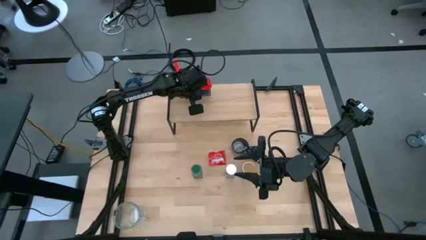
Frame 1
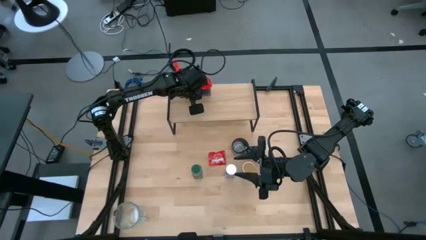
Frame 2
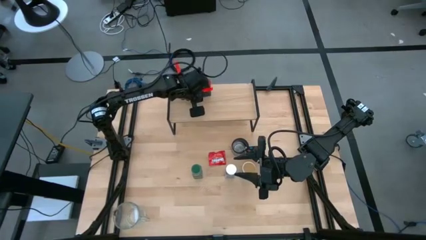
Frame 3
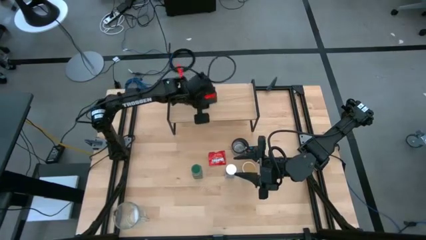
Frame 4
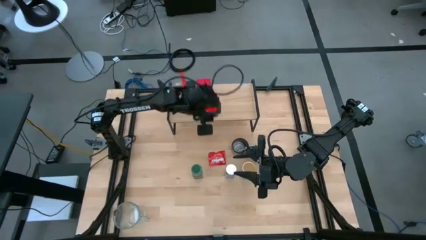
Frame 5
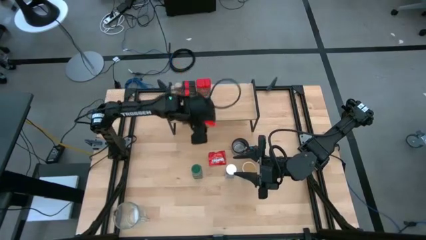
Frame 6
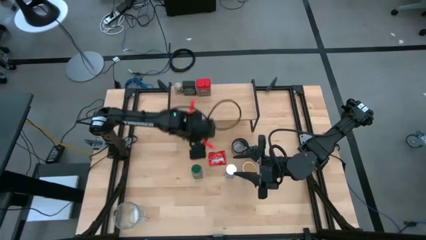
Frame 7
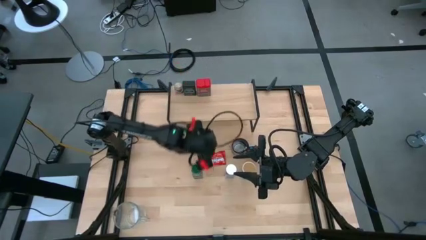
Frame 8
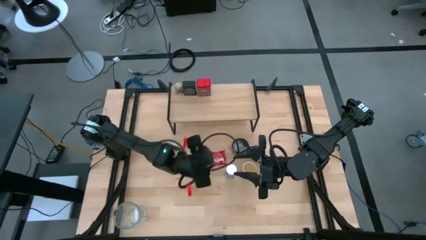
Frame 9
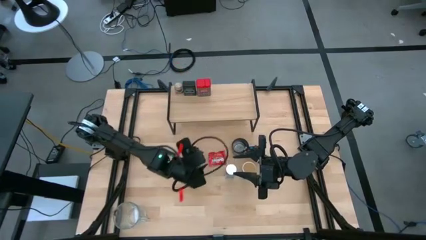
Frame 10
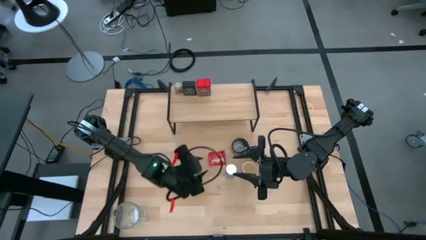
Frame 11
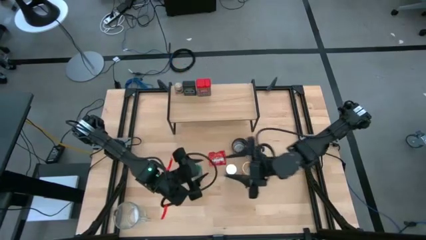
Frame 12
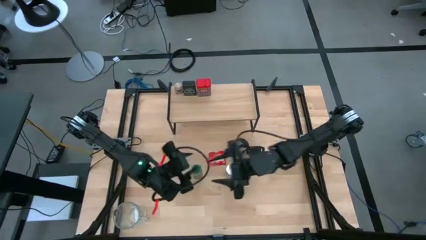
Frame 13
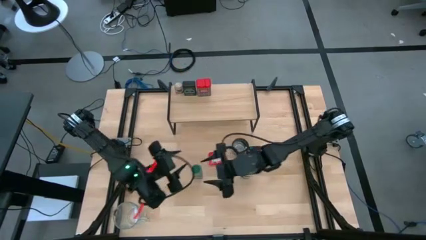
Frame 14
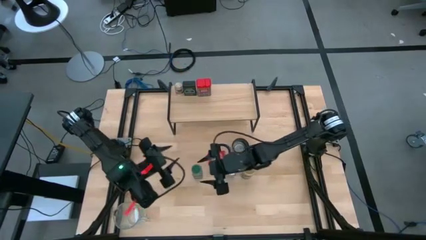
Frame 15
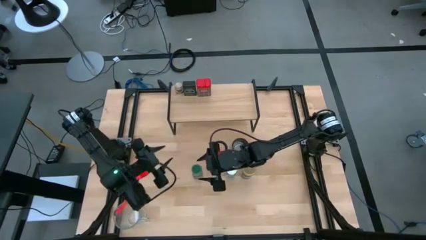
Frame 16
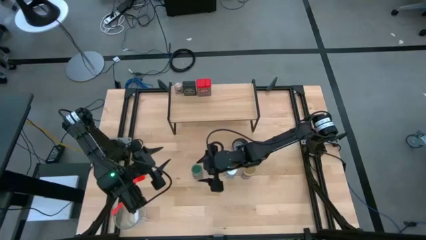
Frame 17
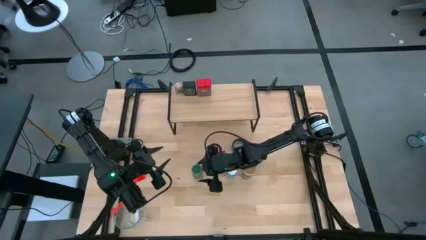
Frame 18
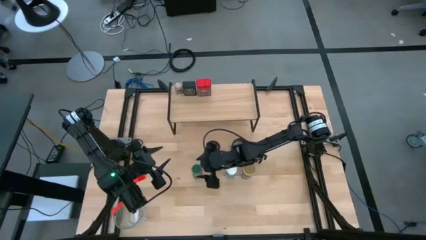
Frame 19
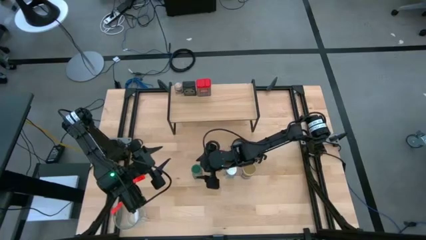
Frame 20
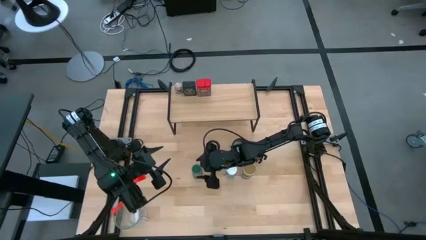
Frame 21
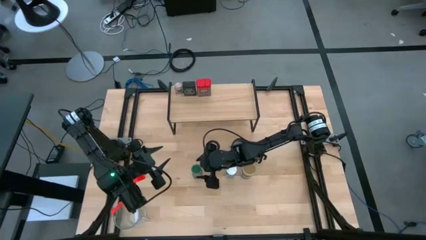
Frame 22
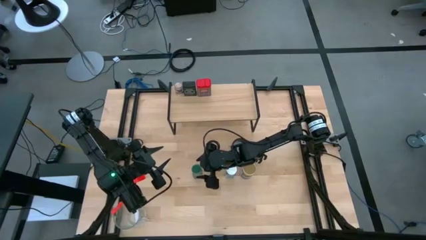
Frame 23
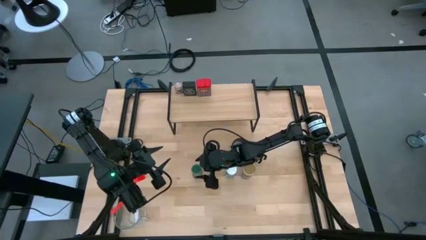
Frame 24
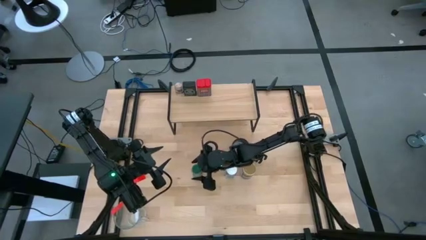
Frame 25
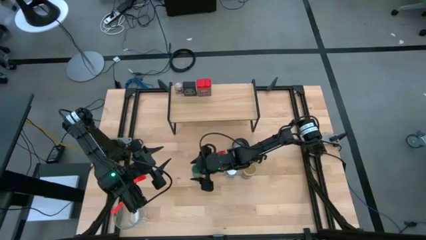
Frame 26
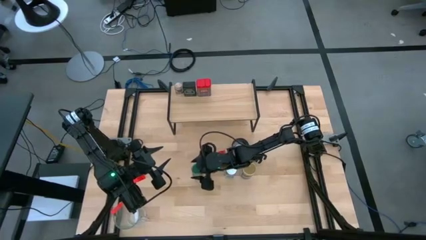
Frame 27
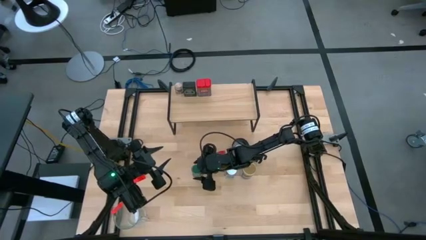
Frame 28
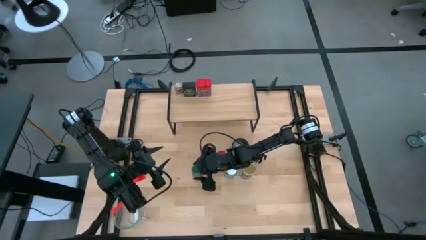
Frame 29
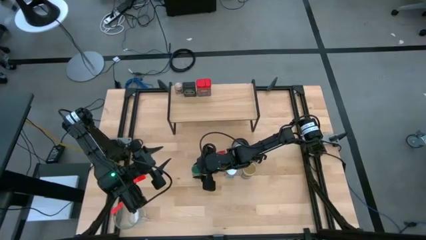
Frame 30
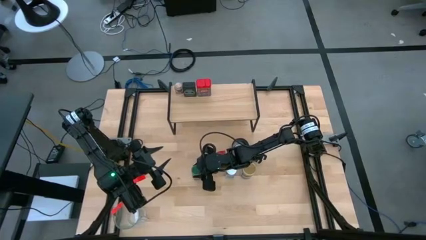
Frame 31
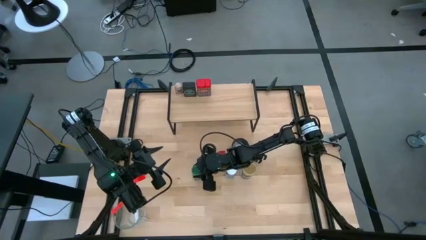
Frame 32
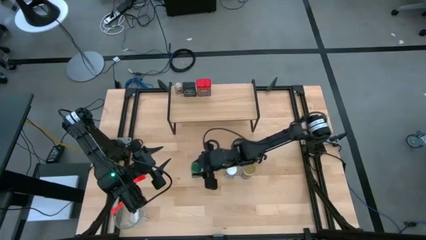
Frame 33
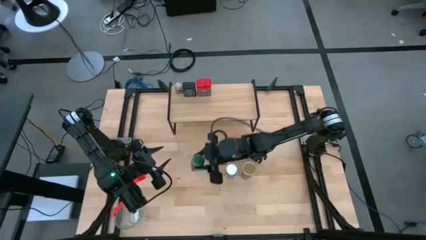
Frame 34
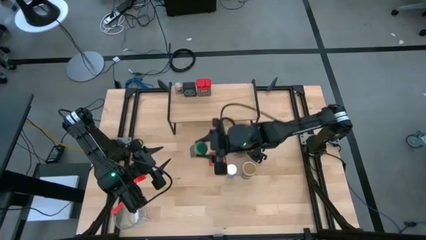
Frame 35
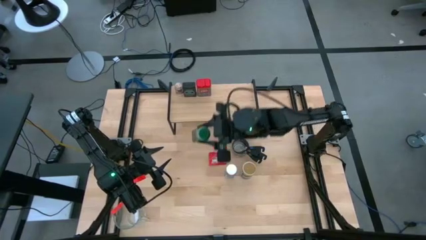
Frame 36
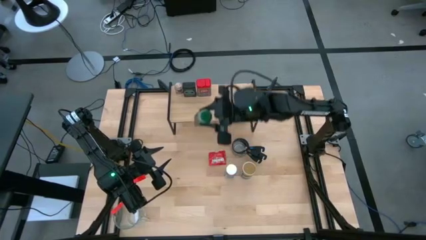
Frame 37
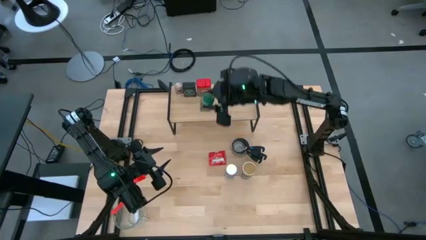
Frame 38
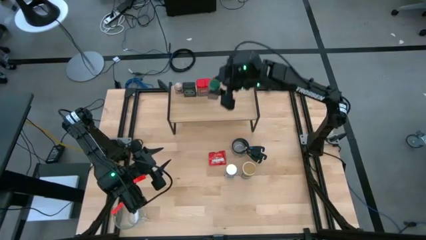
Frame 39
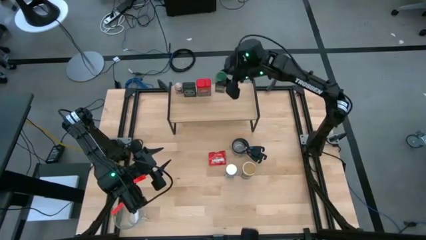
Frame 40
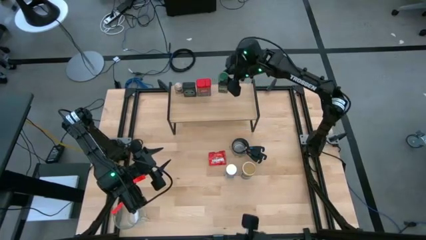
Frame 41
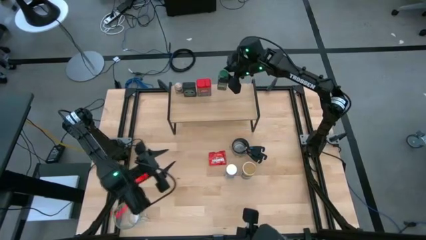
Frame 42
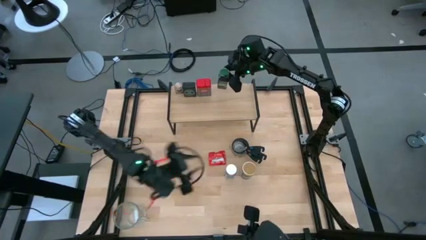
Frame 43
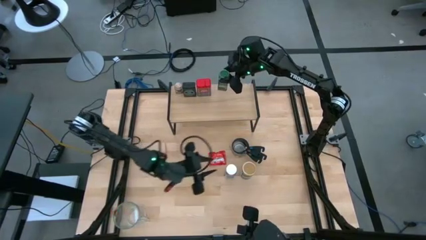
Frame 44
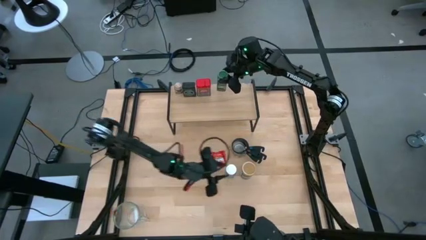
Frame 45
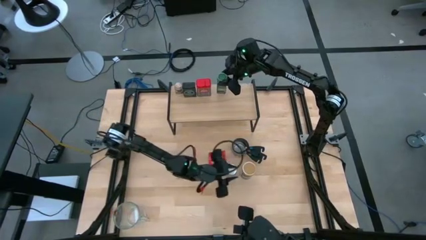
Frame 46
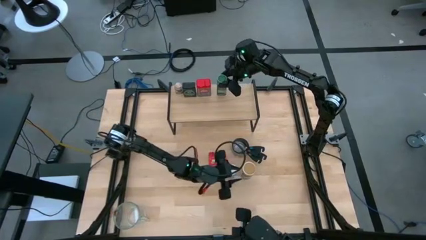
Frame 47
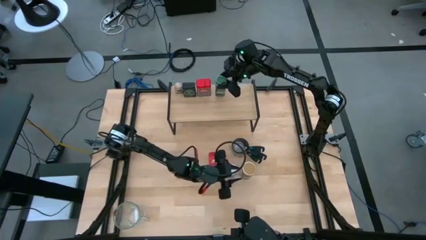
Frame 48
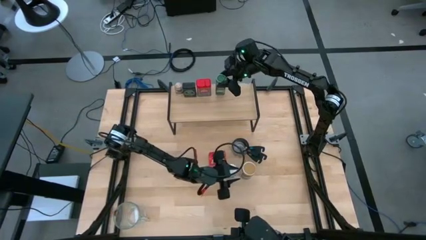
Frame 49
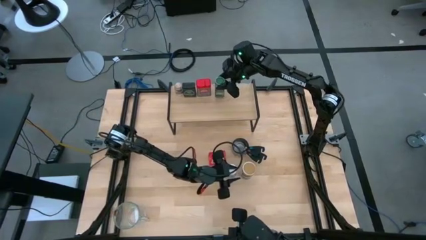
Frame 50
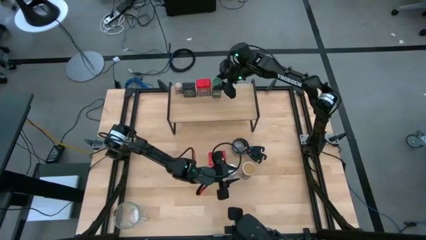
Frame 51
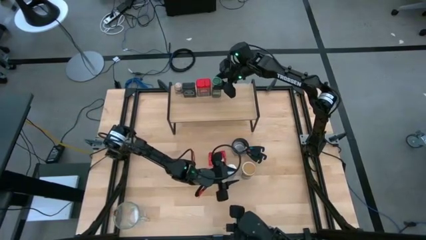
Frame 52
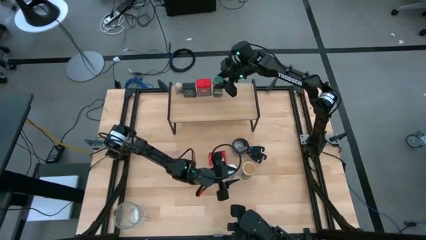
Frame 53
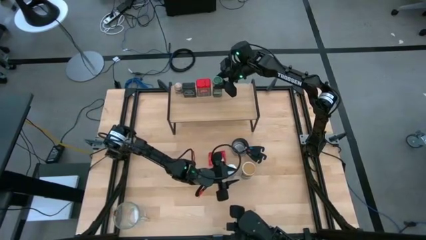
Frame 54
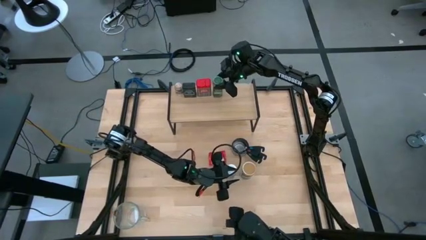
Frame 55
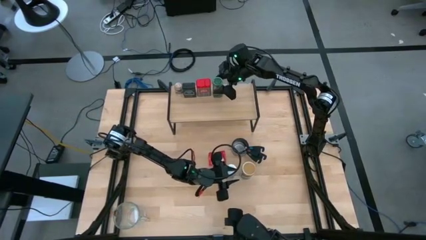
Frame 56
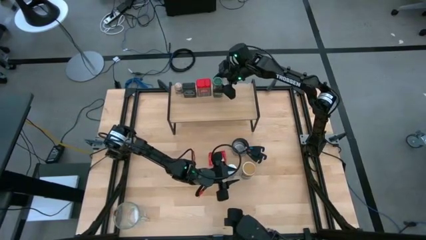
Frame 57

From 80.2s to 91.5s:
Task: Shelf spices
Put the green seasoning bottle on the shelf
